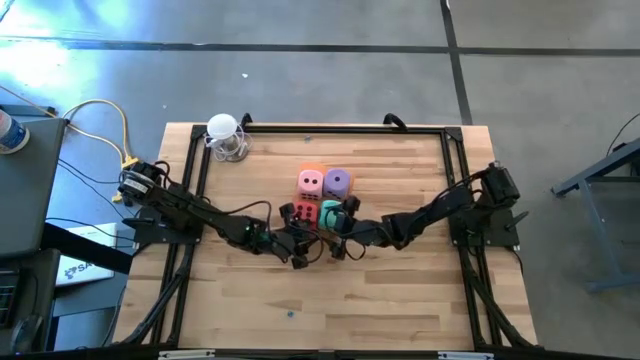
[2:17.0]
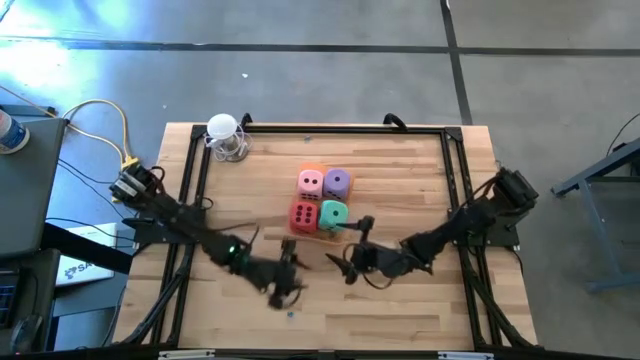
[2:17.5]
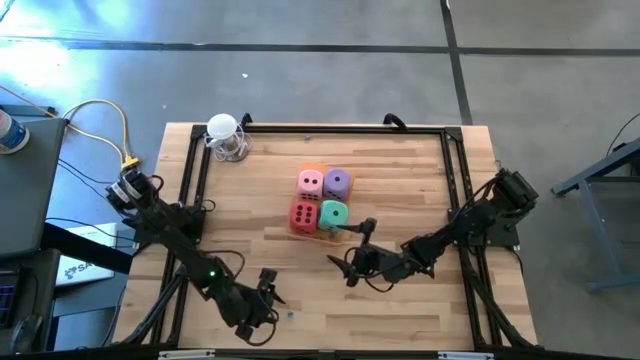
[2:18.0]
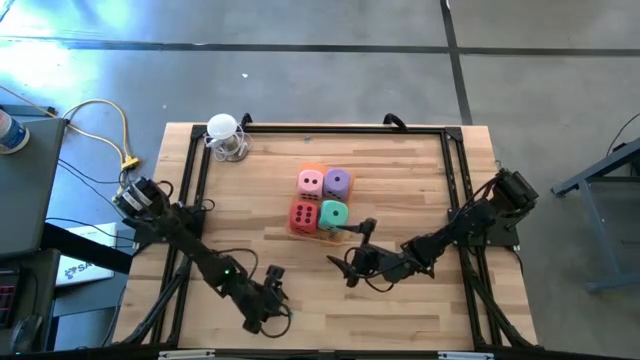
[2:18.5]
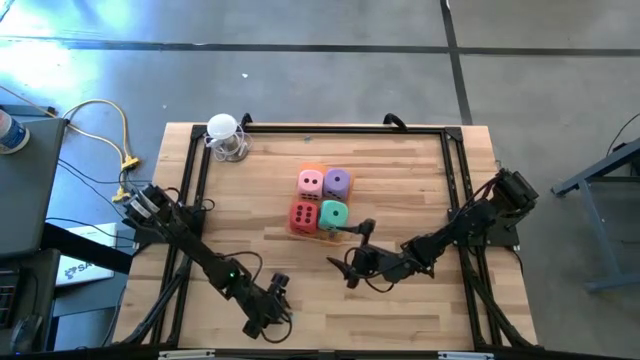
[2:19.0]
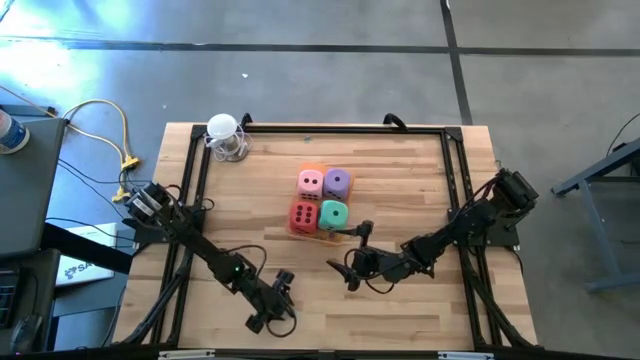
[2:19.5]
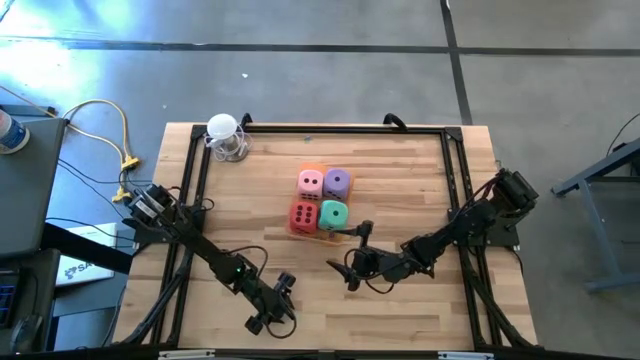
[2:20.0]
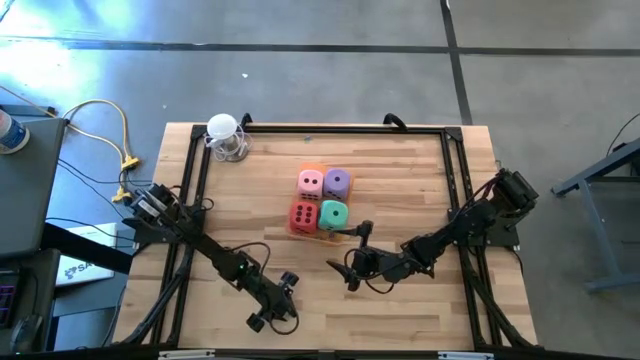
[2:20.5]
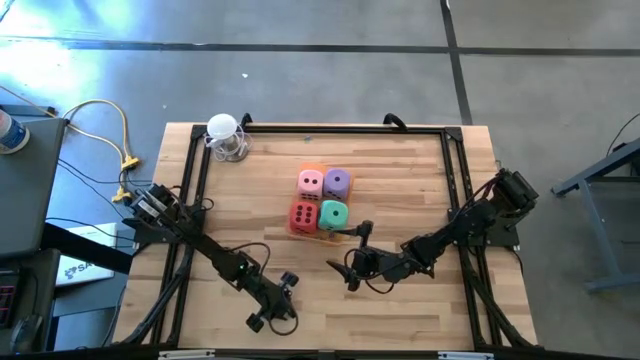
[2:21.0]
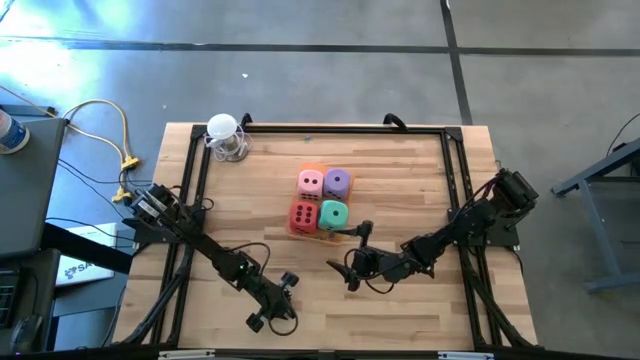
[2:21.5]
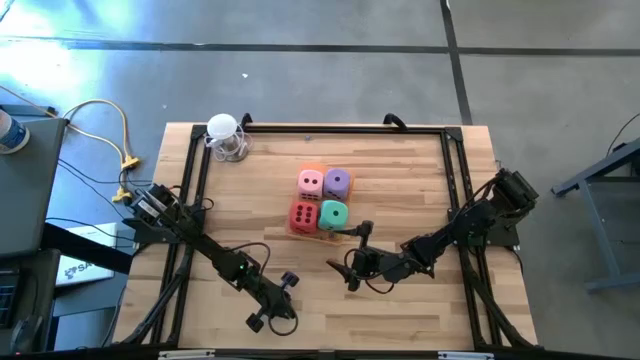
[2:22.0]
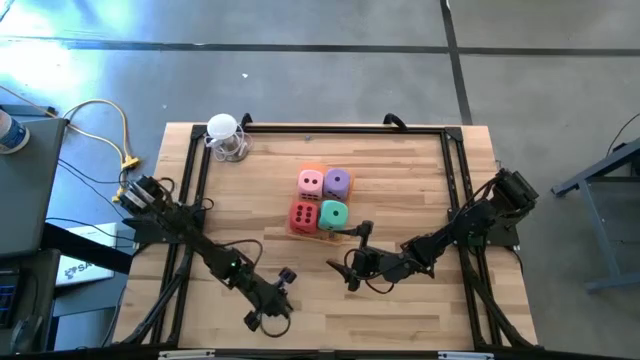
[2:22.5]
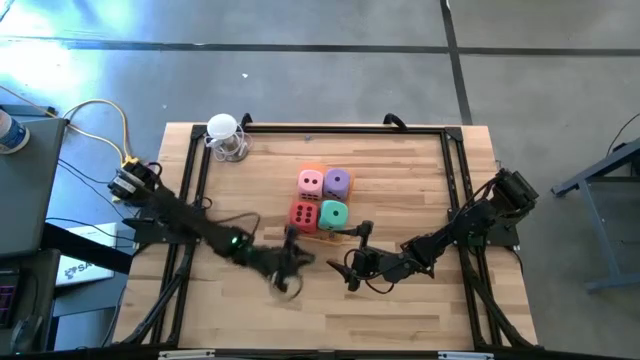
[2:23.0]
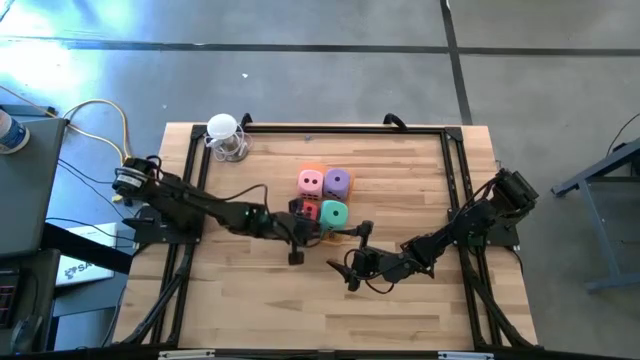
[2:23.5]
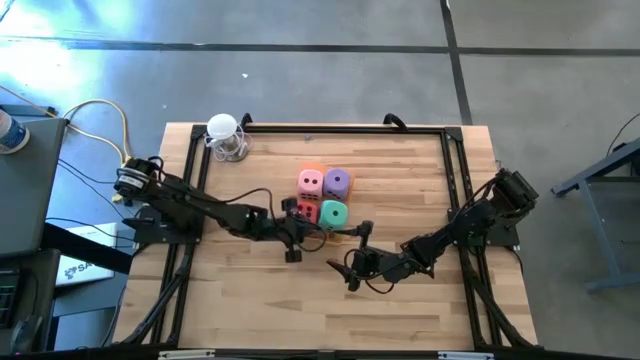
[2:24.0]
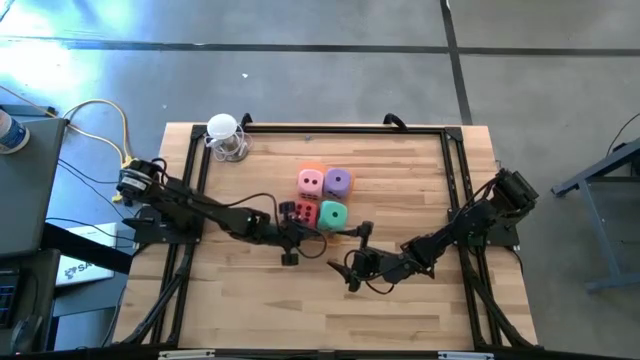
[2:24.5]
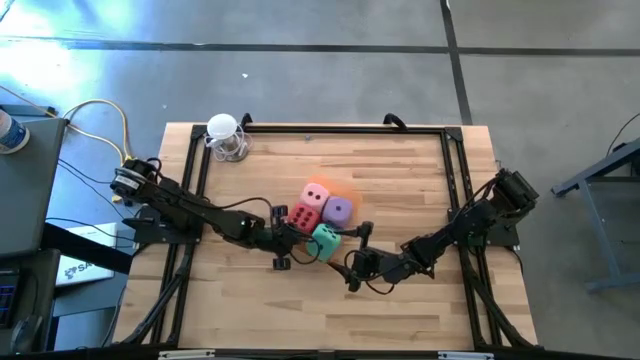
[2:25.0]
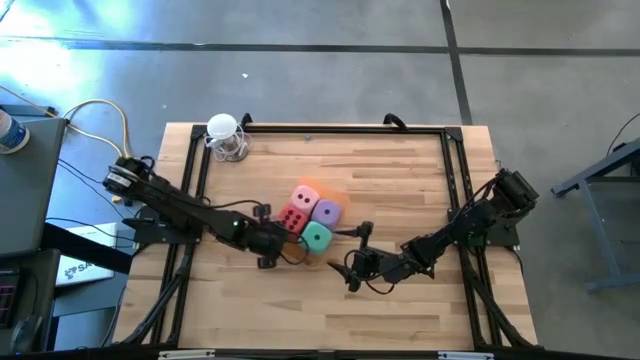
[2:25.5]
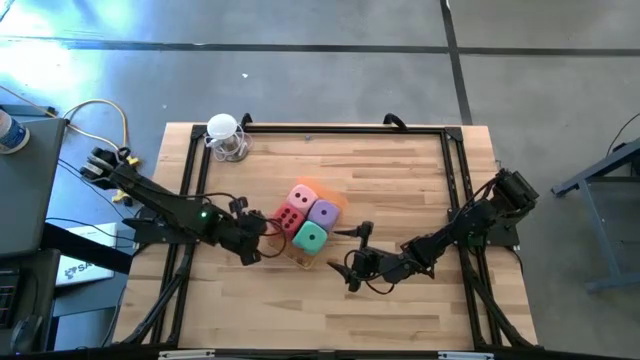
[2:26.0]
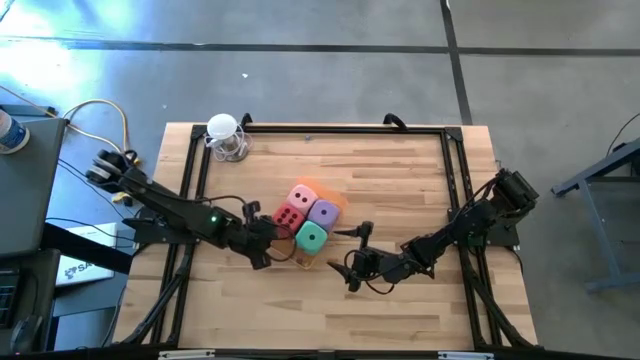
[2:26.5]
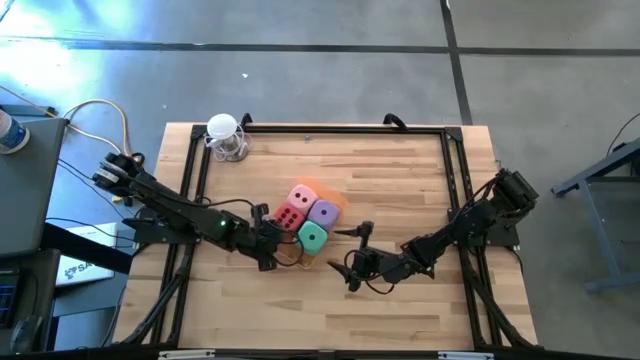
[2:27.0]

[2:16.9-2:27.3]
Task: Pick & Place Dice
Put the bottom small light blue die into the orange bin

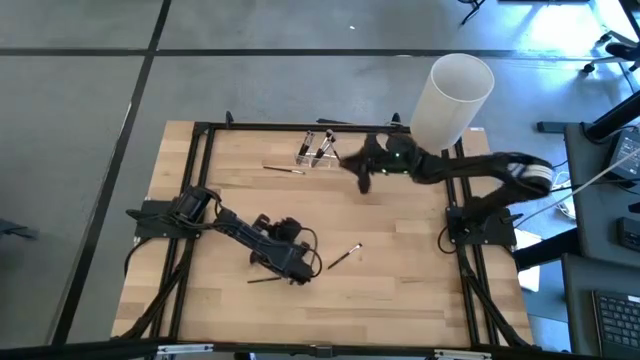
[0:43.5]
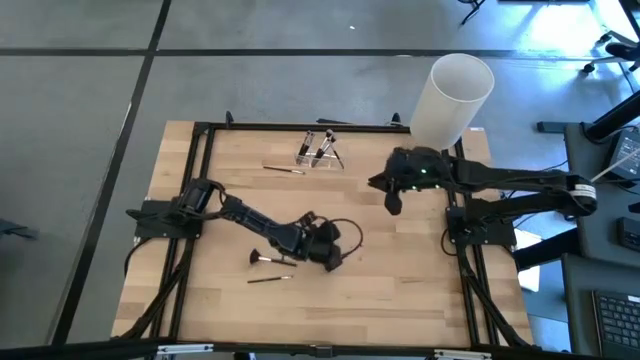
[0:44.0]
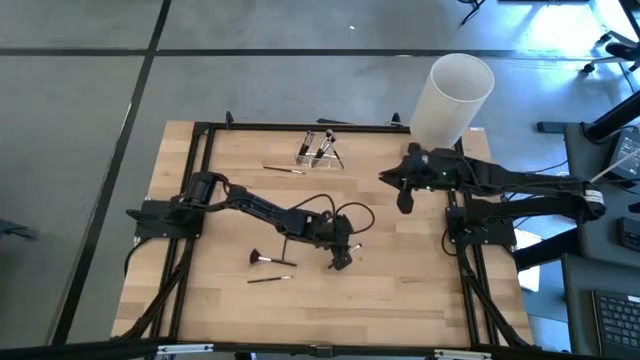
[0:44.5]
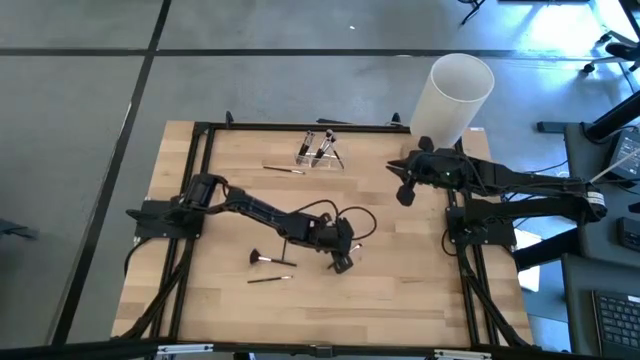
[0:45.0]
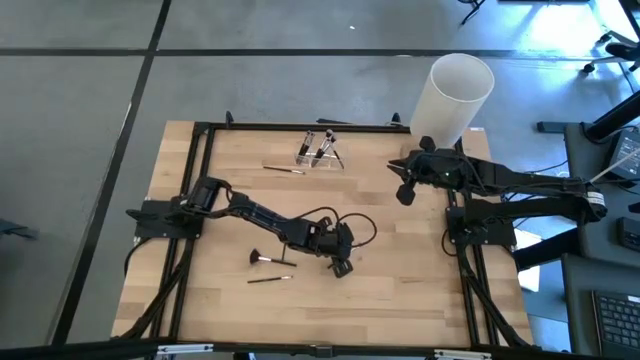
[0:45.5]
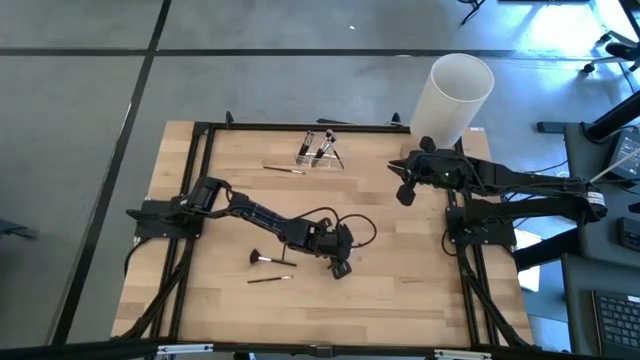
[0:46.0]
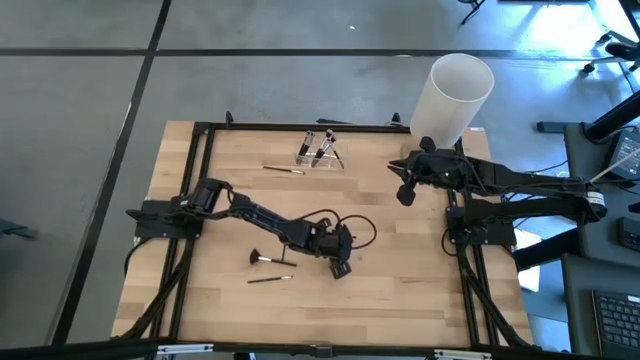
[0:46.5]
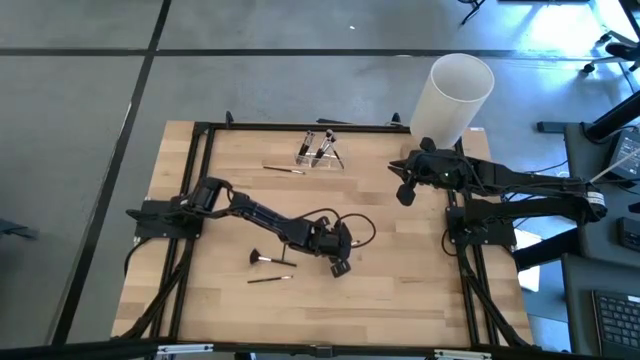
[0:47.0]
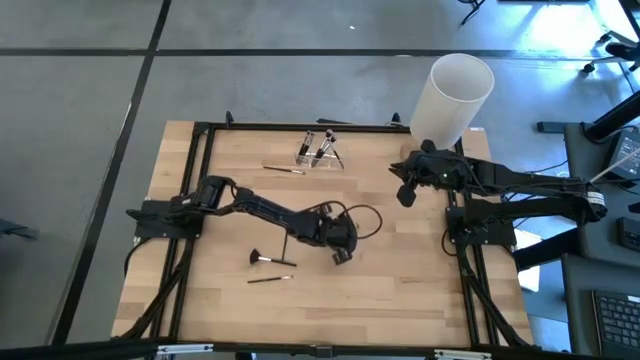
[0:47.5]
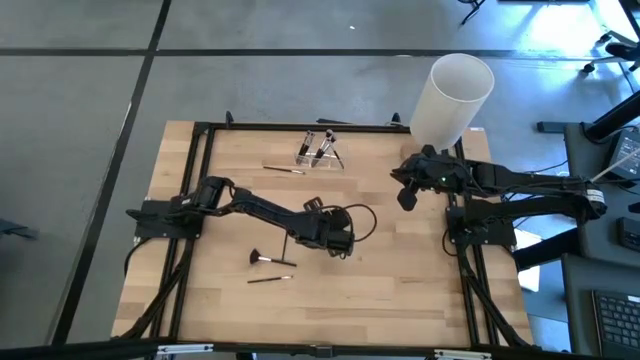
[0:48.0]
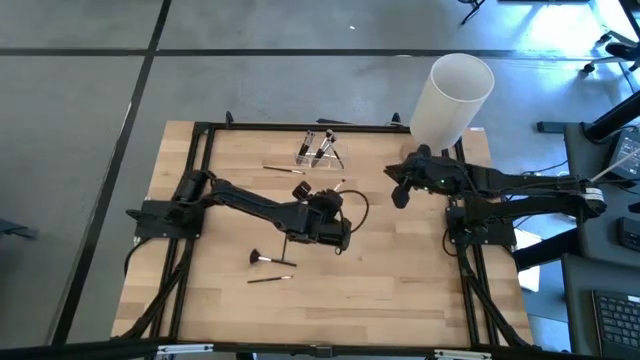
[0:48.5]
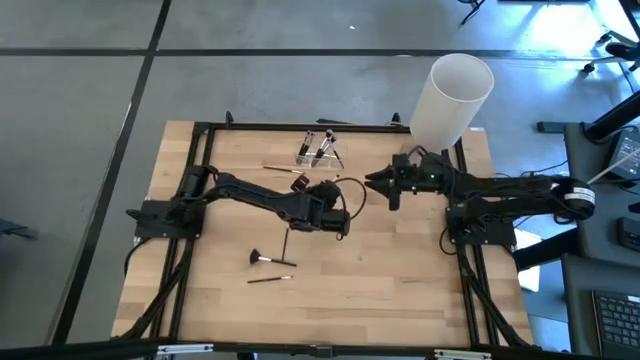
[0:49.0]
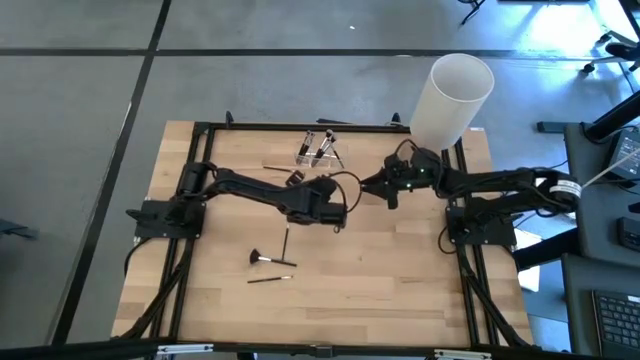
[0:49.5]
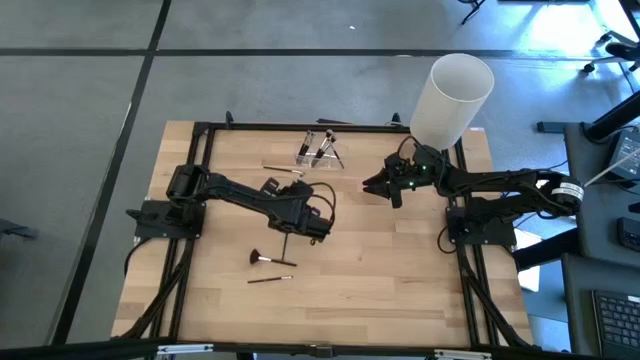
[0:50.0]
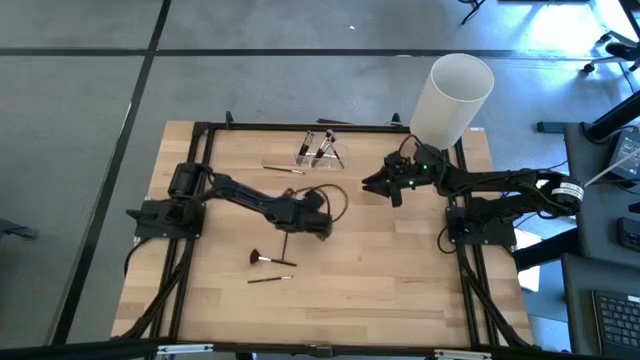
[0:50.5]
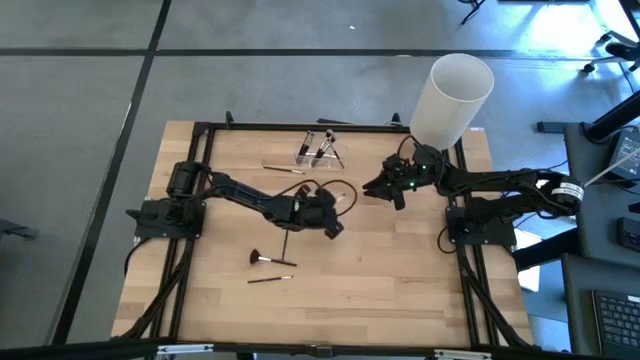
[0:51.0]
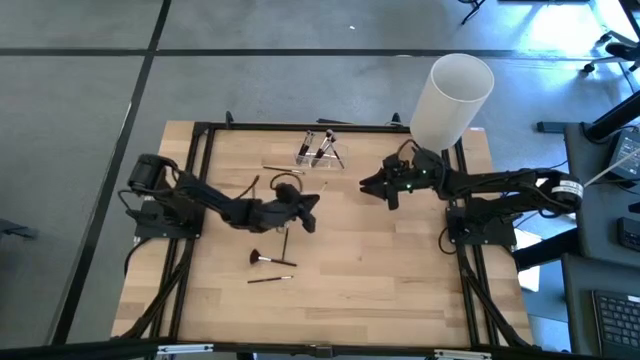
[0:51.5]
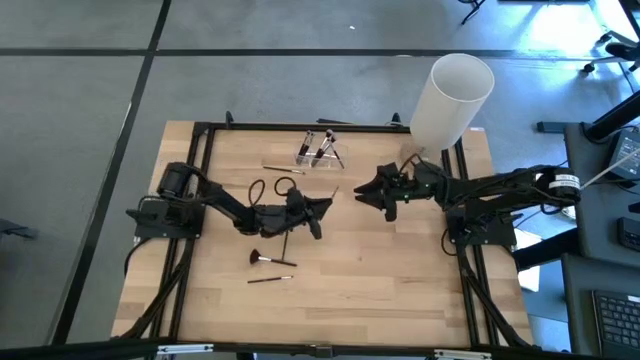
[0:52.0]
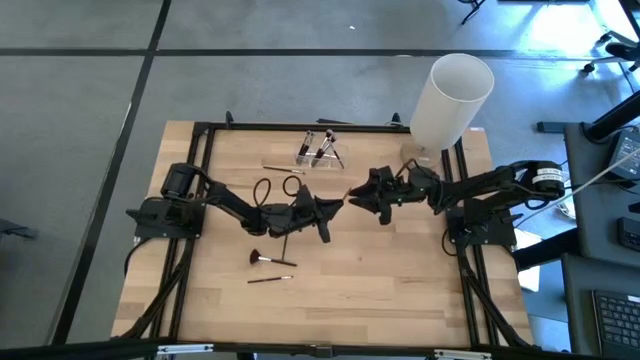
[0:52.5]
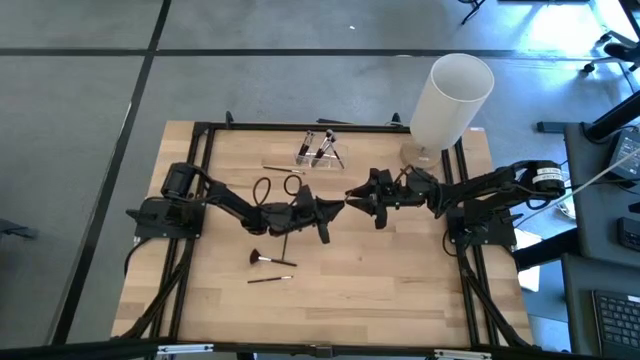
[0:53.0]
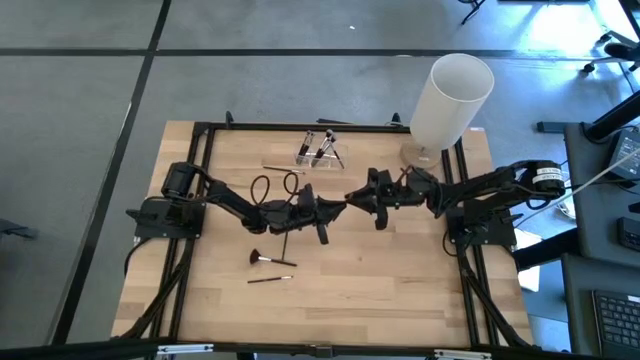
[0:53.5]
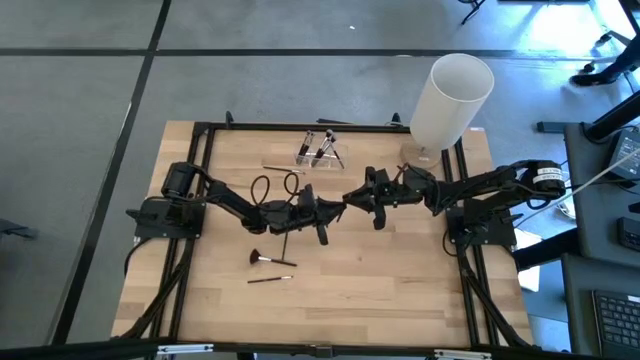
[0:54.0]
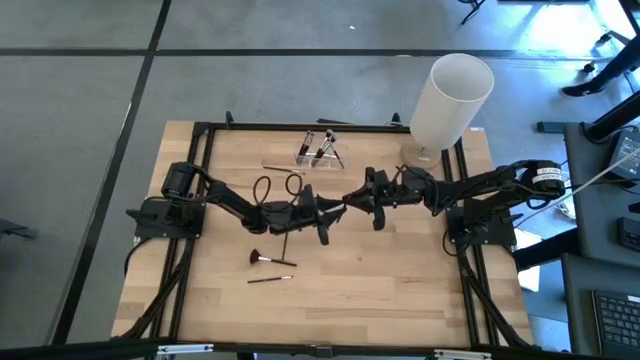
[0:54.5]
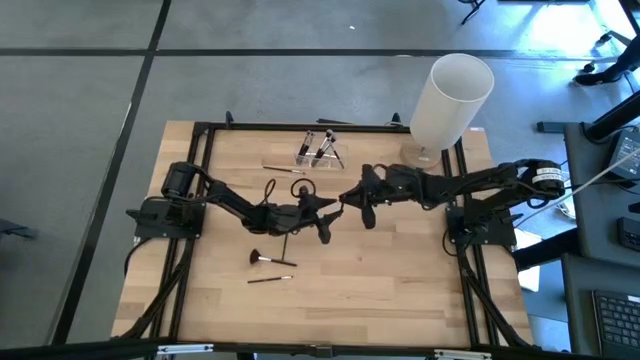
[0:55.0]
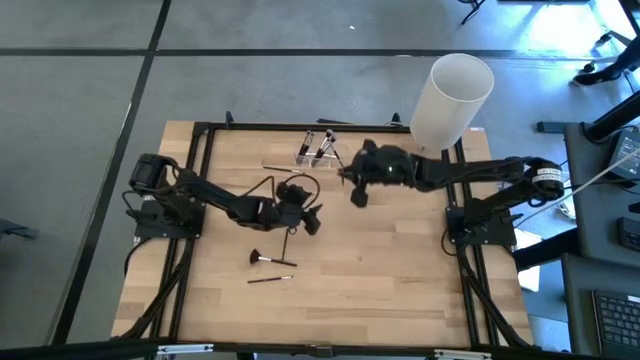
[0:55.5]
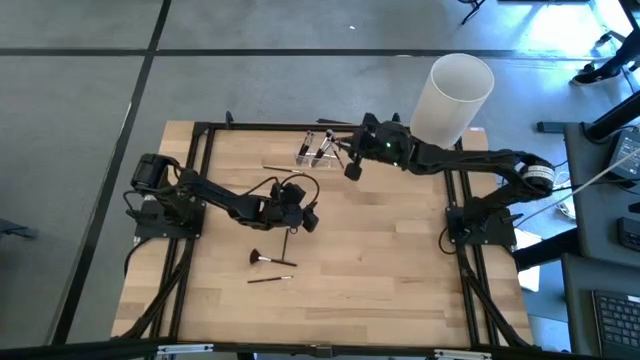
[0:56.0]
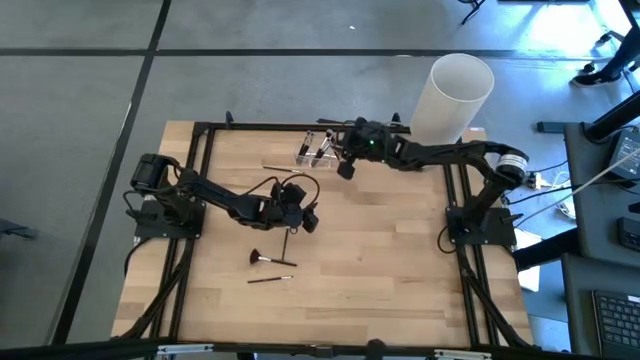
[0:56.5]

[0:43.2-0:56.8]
Task: Pick & Place Makeup Brushes
Put the eyeshadow brush into the transparent organizer
